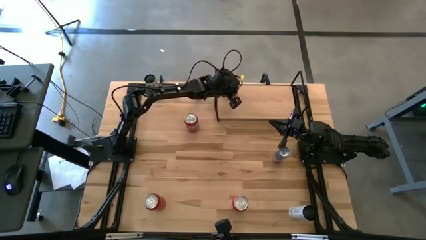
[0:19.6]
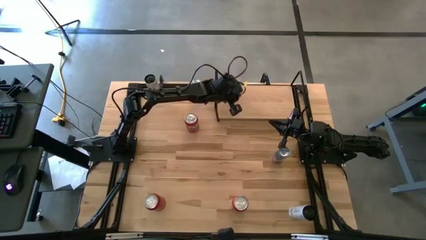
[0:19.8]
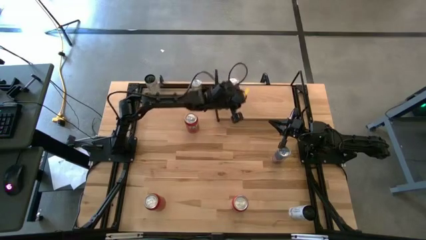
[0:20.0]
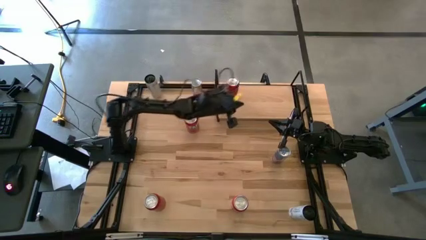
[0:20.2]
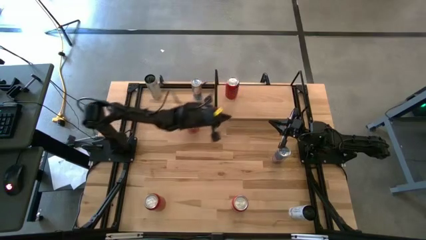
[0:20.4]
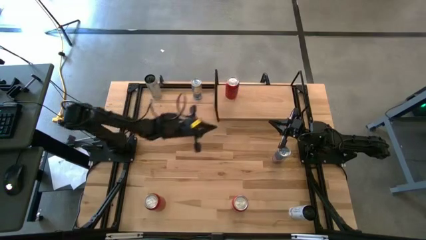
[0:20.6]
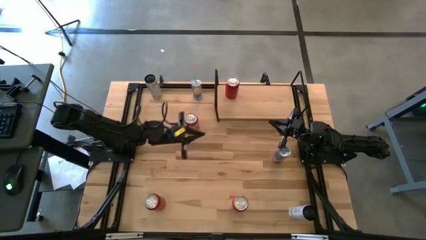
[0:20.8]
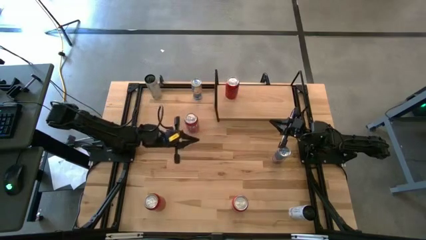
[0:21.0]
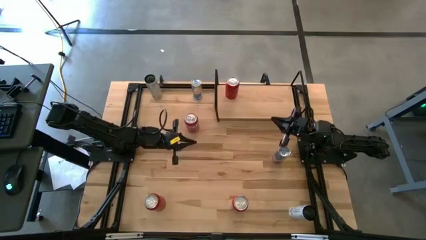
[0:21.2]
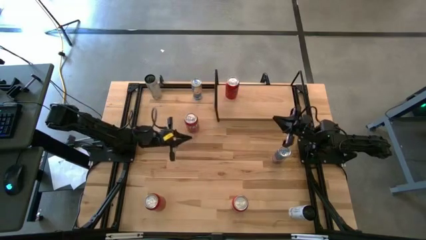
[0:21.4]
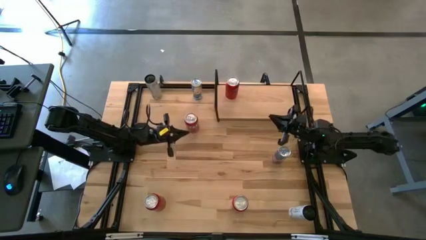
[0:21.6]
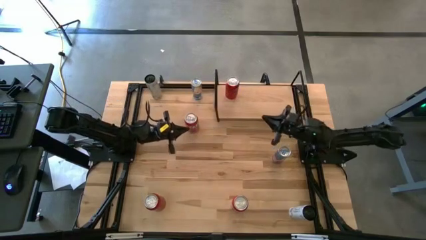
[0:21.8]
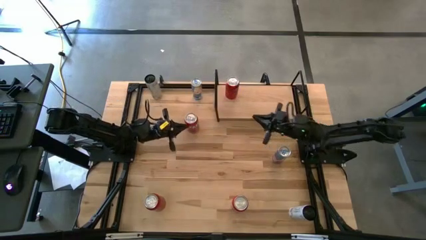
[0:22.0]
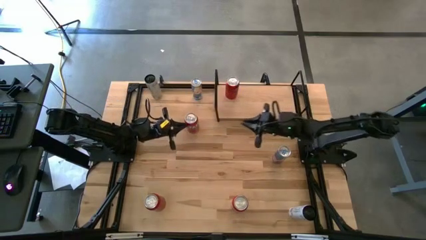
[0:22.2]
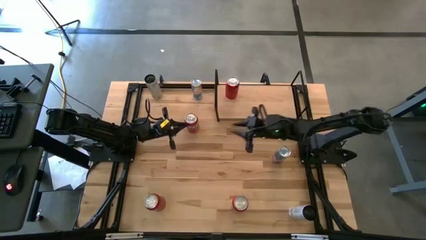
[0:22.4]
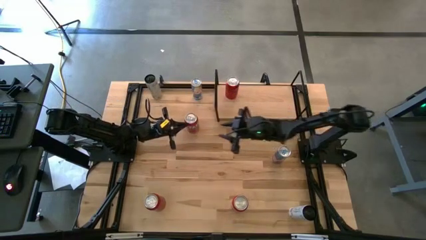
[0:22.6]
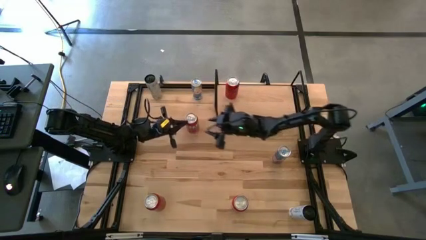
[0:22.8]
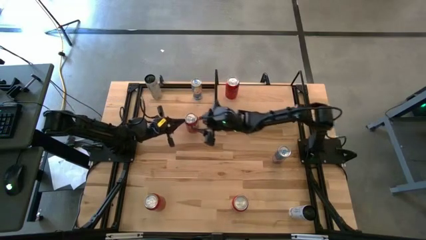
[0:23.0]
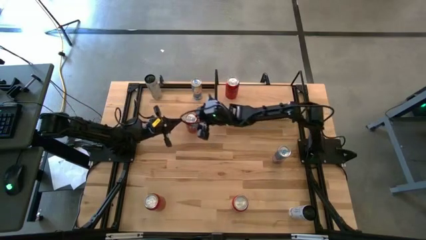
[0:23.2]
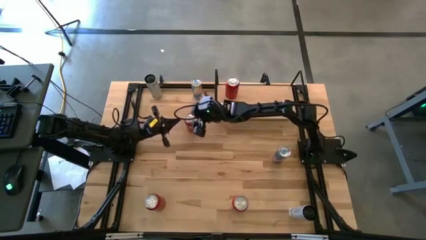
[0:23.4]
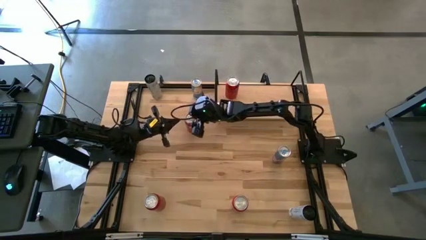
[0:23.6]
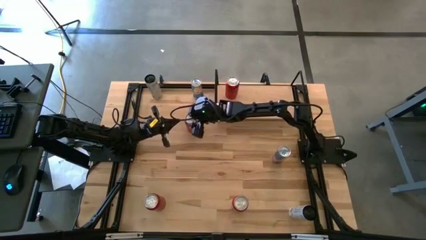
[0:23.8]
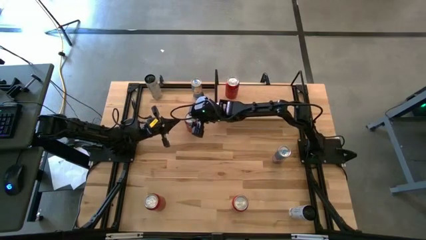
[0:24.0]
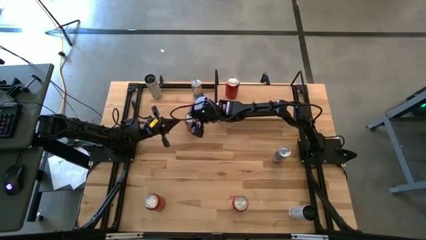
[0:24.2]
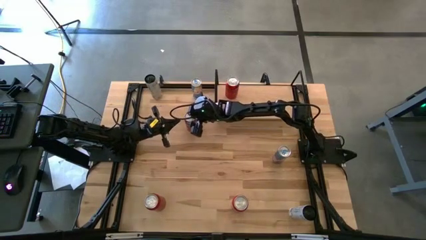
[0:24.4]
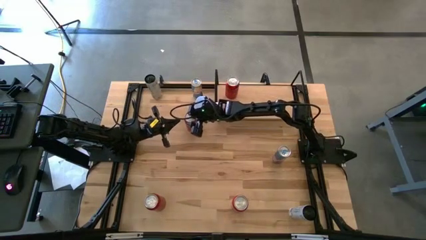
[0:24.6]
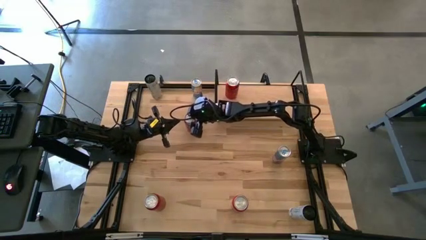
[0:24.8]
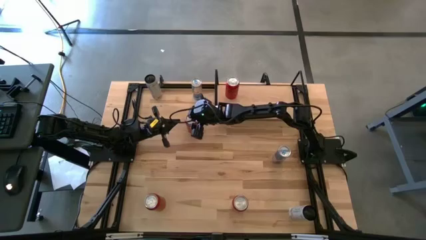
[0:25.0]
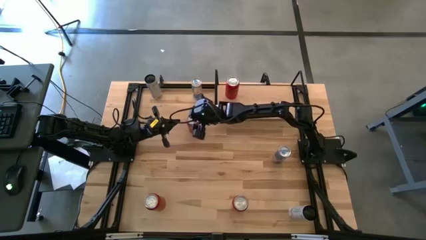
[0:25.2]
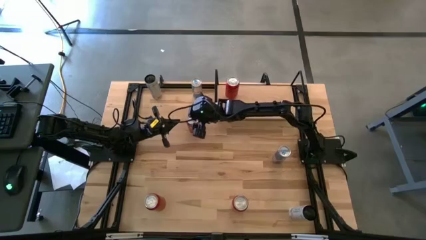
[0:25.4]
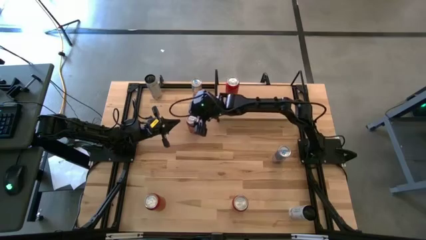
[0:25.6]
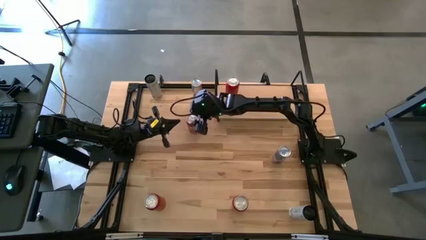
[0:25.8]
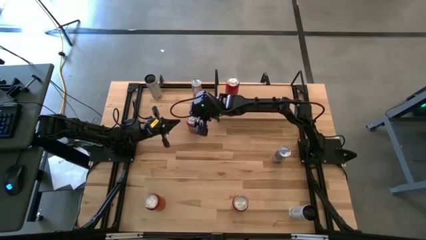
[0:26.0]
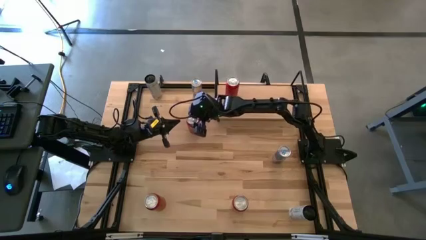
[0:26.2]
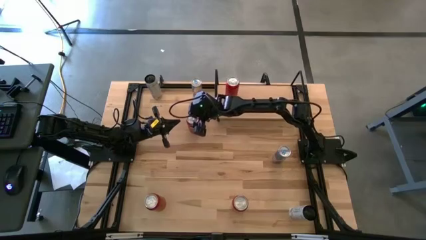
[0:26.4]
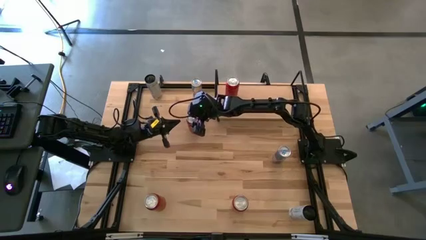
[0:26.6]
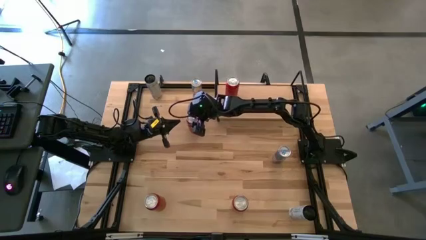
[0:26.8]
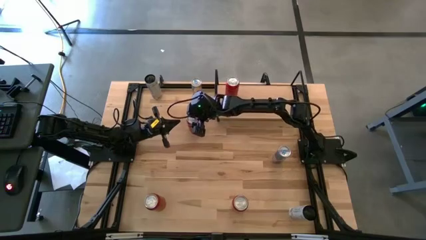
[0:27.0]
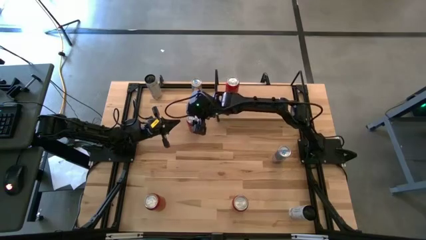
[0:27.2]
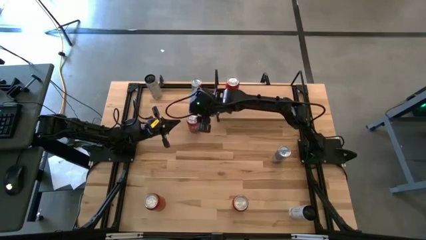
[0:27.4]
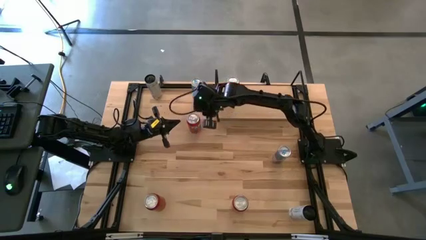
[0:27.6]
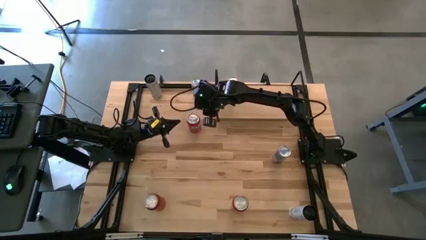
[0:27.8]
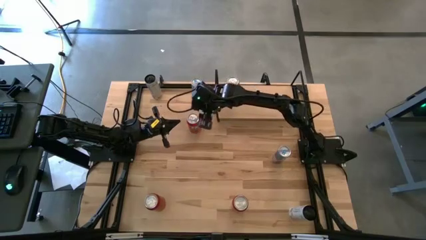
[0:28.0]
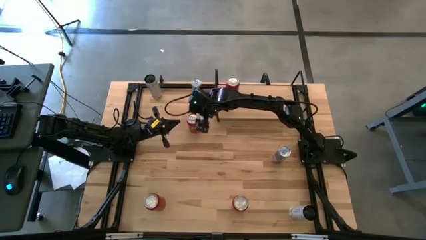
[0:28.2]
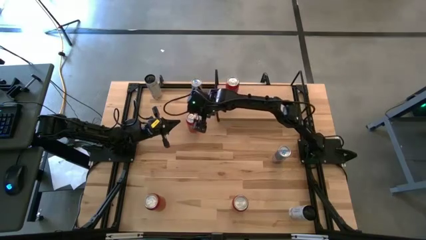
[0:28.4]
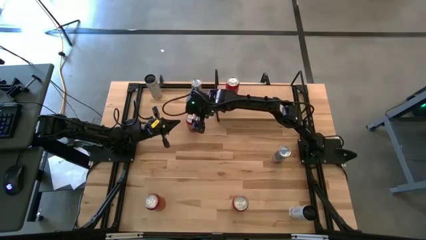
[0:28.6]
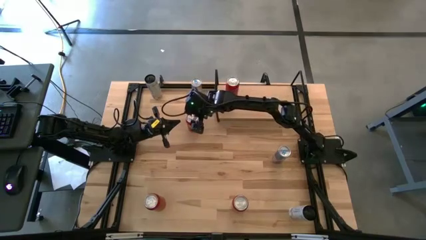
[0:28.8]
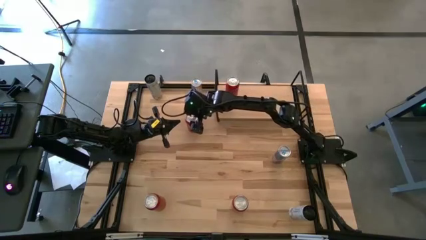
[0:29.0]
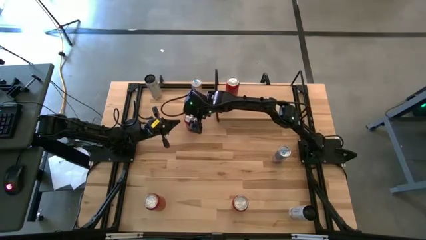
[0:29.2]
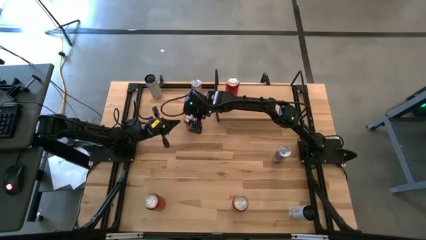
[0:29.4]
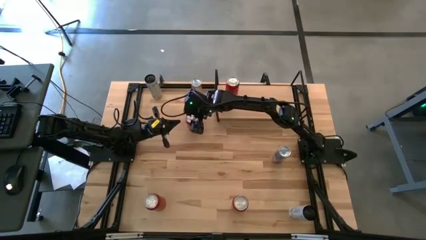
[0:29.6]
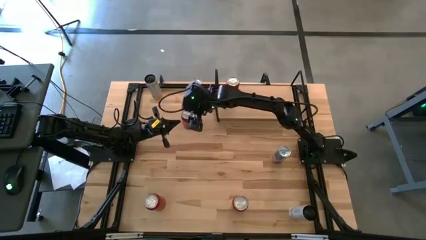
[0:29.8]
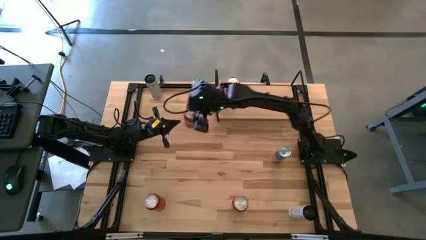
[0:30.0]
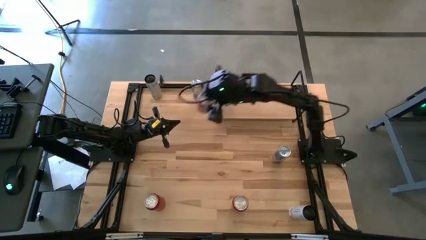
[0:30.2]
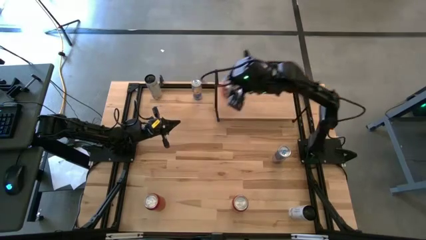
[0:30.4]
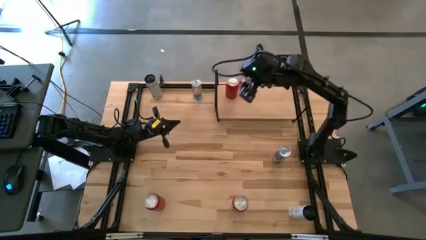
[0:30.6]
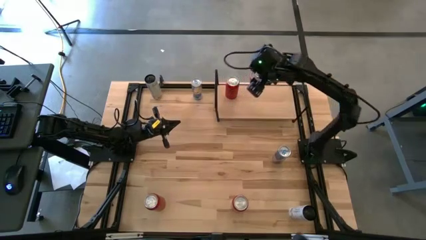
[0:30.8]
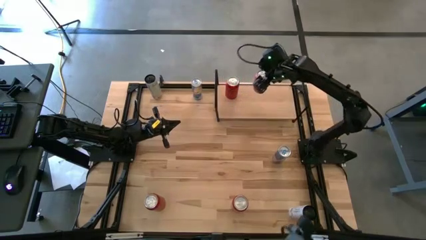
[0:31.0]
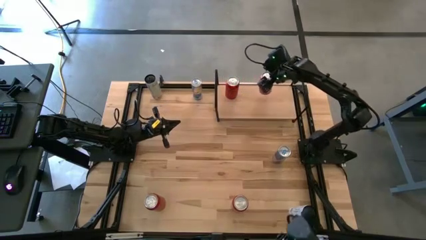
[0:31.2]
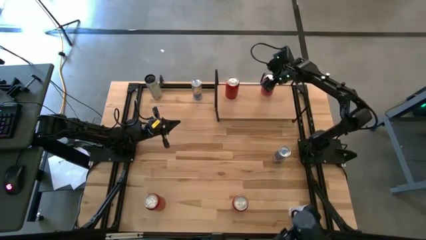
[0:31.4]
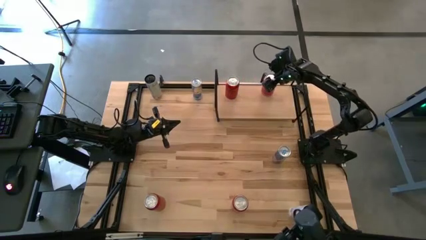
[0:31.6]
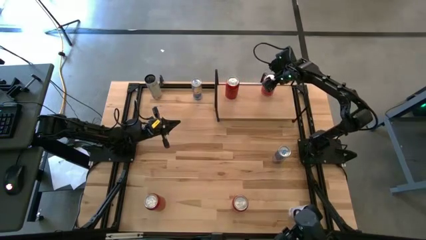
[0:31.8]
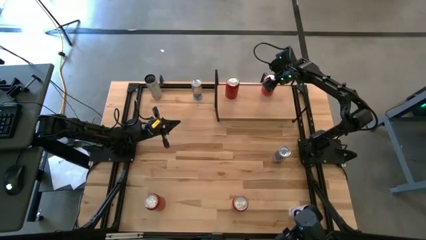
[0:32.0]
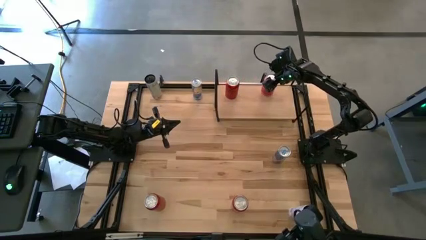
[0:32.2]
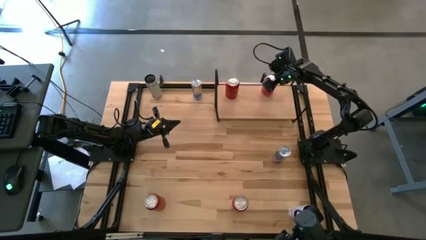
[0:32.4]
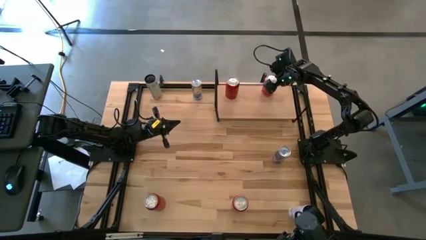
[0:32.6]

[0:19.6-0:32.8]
Task: Place canned beverage on shelf
Put the top red soda can on the shelf
